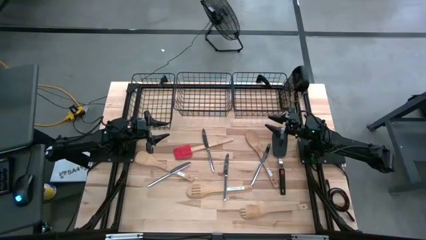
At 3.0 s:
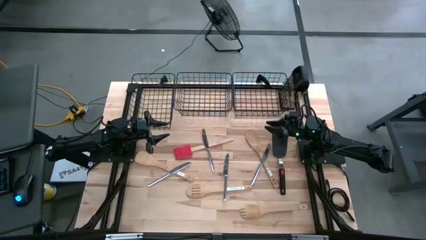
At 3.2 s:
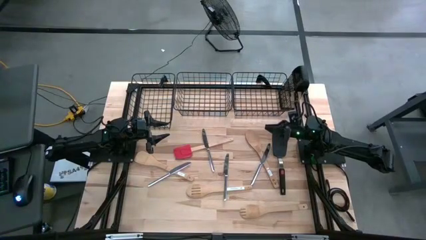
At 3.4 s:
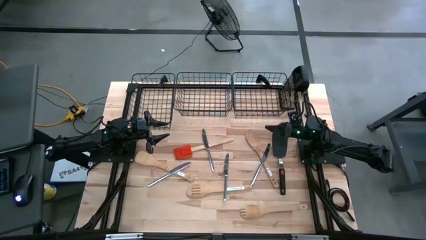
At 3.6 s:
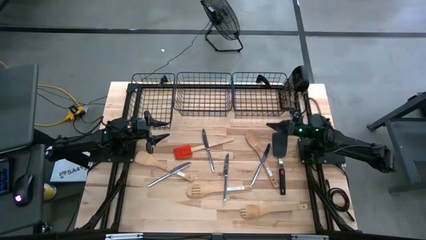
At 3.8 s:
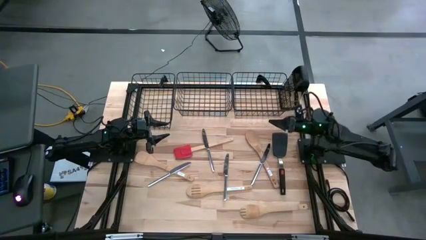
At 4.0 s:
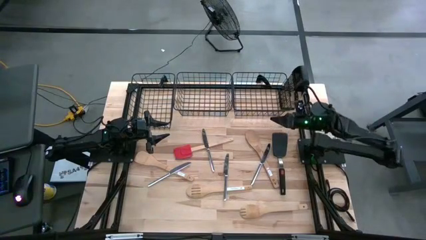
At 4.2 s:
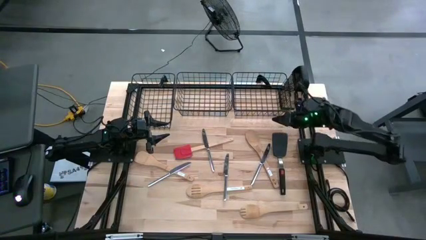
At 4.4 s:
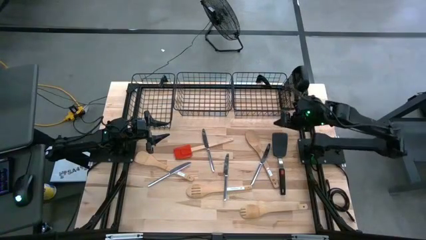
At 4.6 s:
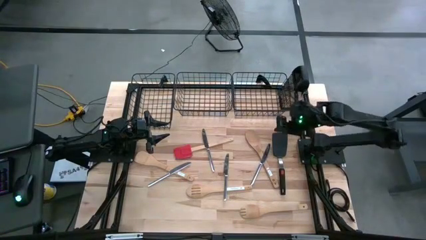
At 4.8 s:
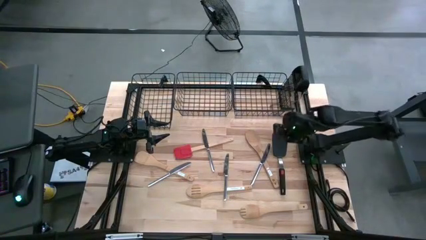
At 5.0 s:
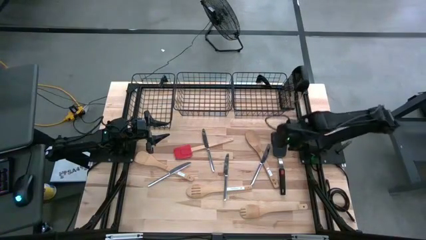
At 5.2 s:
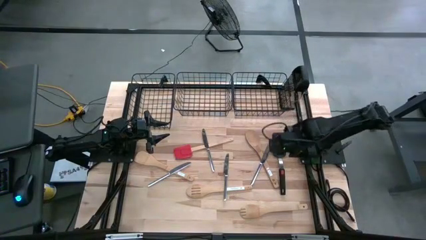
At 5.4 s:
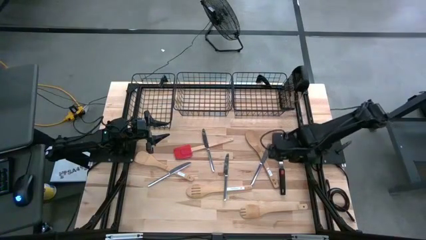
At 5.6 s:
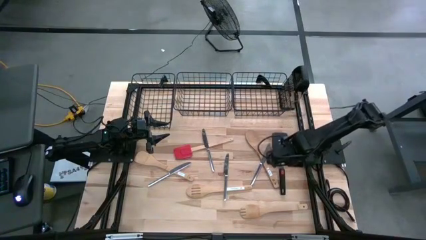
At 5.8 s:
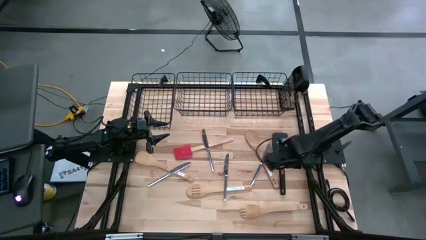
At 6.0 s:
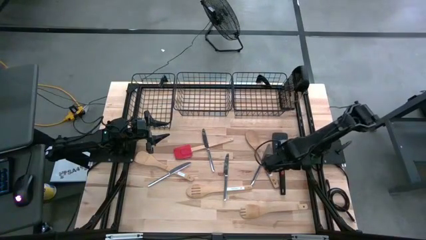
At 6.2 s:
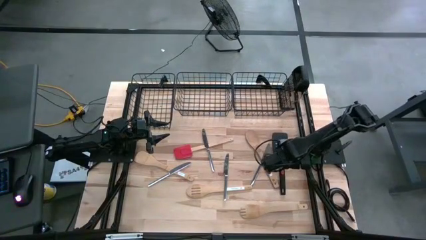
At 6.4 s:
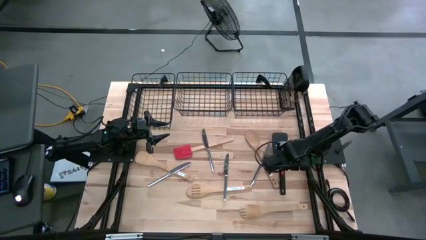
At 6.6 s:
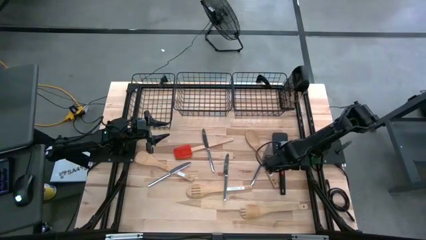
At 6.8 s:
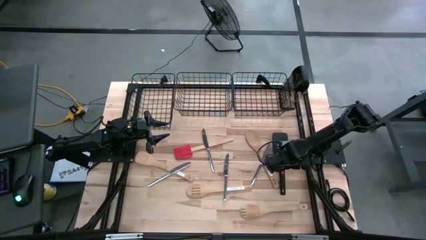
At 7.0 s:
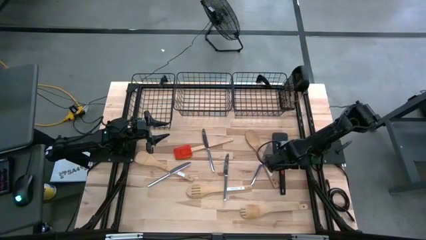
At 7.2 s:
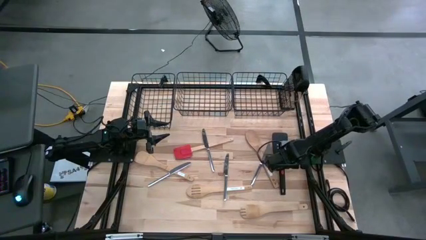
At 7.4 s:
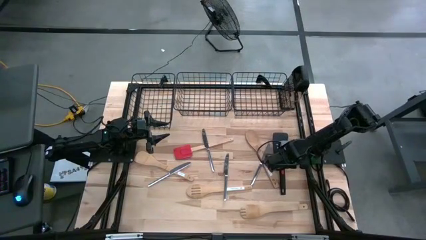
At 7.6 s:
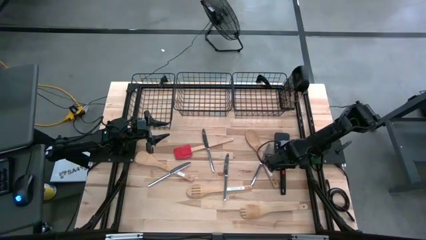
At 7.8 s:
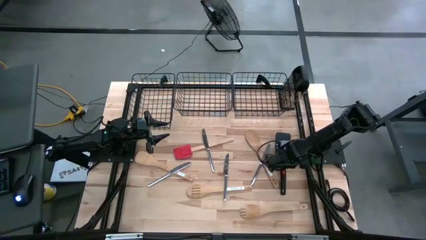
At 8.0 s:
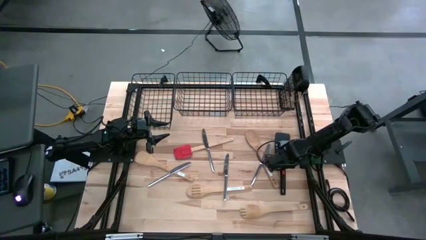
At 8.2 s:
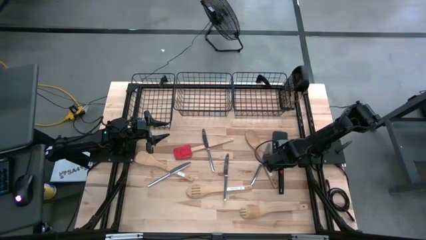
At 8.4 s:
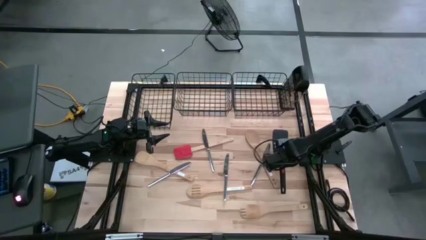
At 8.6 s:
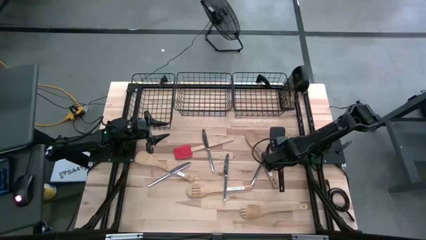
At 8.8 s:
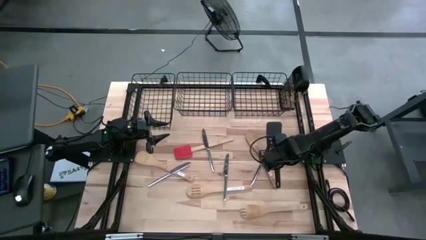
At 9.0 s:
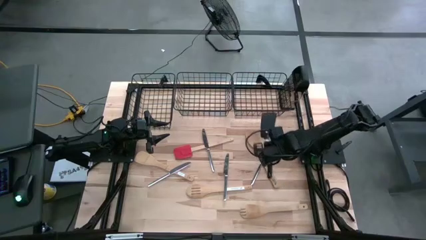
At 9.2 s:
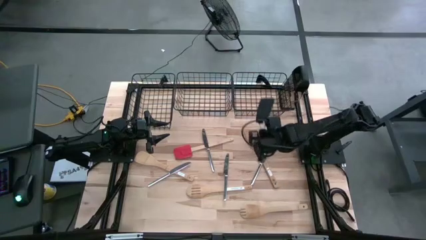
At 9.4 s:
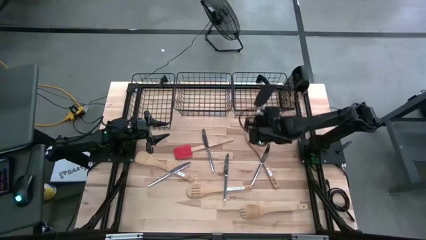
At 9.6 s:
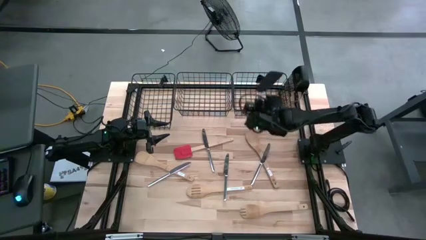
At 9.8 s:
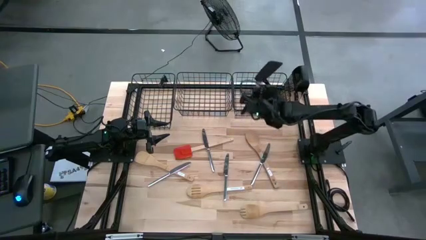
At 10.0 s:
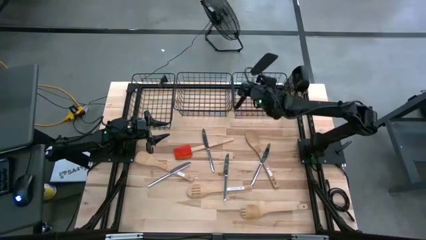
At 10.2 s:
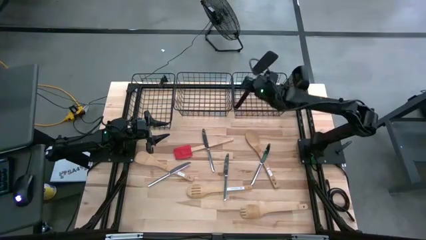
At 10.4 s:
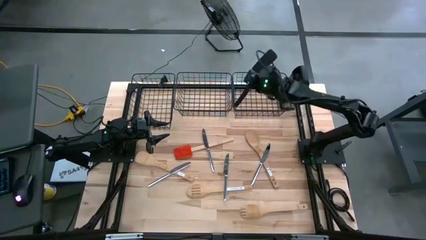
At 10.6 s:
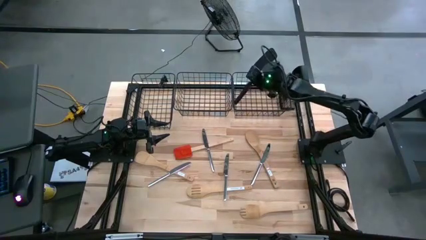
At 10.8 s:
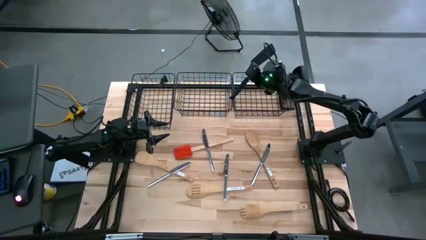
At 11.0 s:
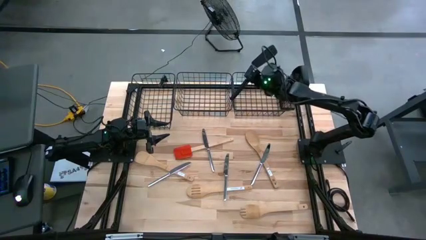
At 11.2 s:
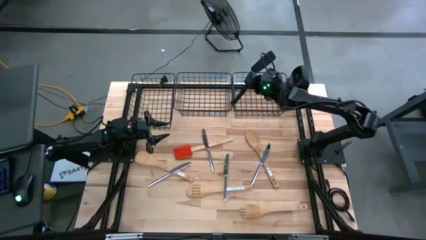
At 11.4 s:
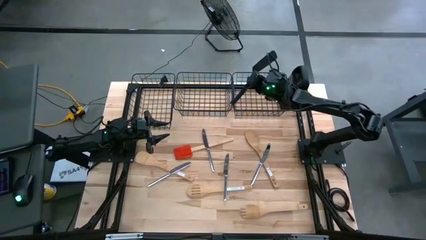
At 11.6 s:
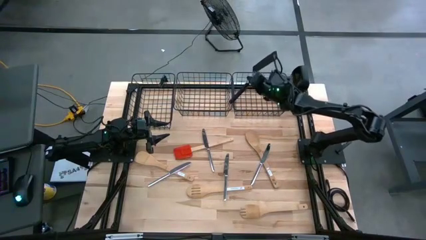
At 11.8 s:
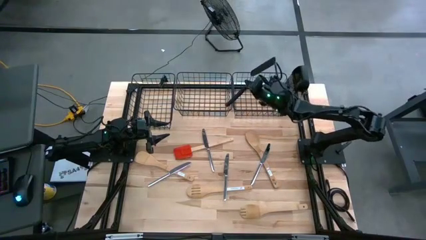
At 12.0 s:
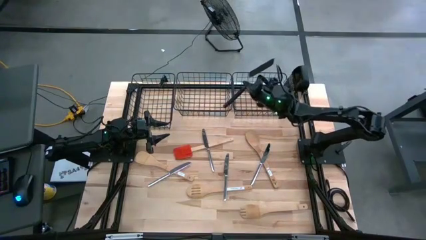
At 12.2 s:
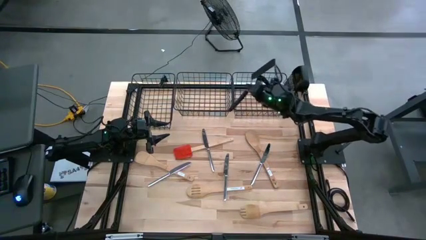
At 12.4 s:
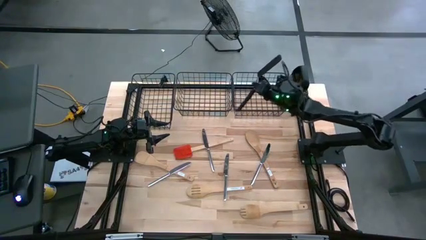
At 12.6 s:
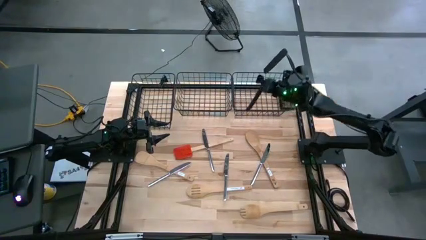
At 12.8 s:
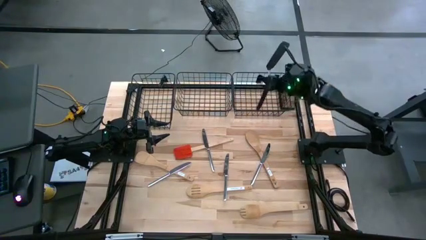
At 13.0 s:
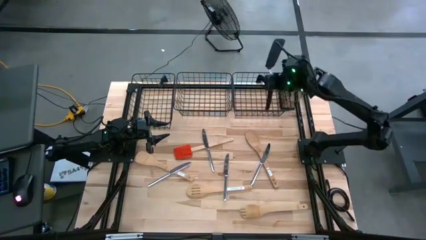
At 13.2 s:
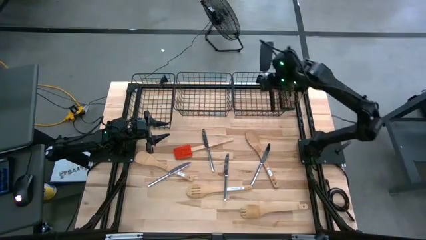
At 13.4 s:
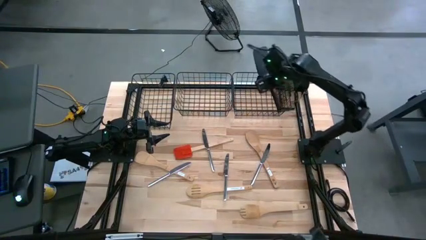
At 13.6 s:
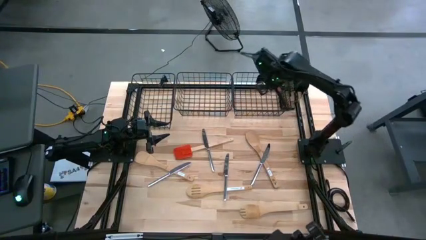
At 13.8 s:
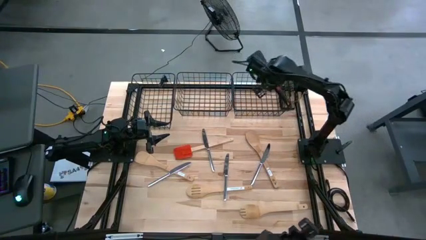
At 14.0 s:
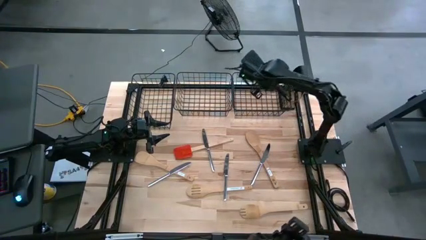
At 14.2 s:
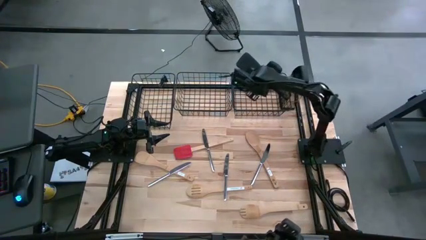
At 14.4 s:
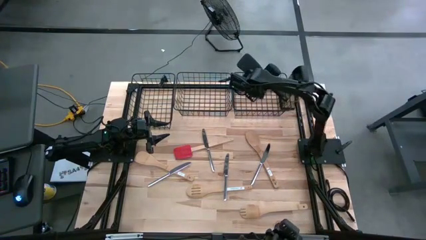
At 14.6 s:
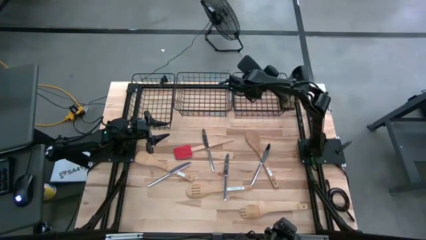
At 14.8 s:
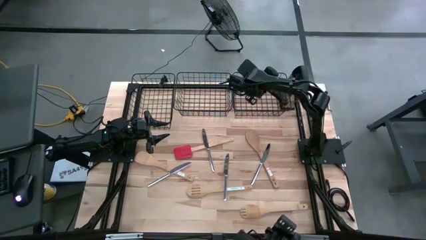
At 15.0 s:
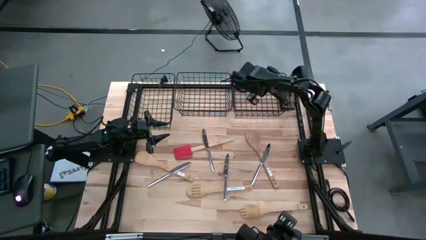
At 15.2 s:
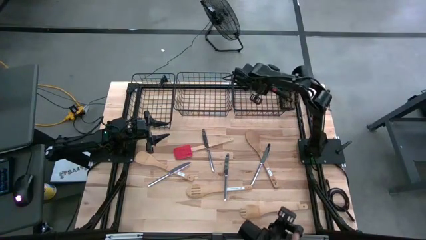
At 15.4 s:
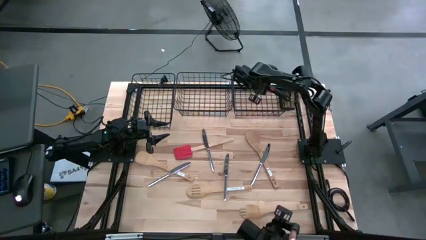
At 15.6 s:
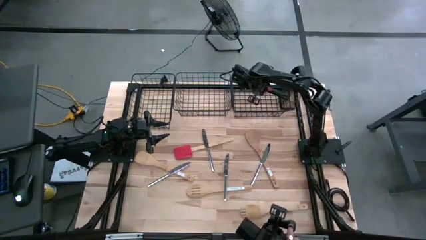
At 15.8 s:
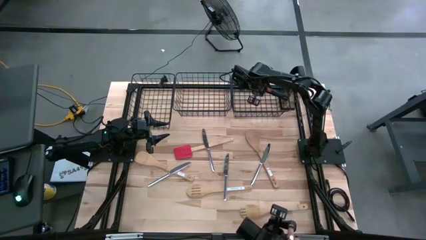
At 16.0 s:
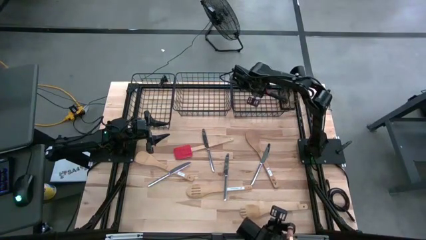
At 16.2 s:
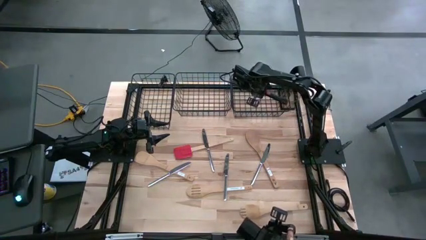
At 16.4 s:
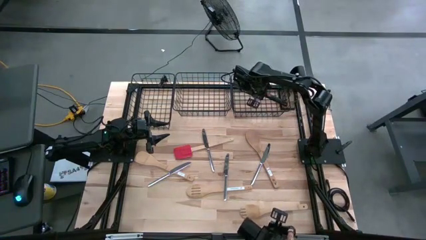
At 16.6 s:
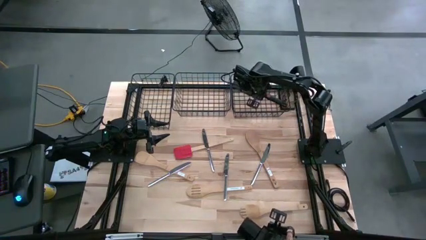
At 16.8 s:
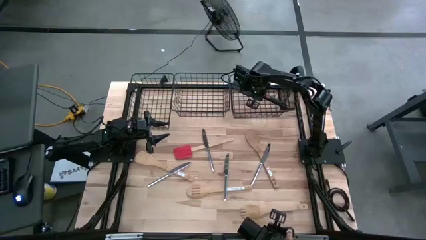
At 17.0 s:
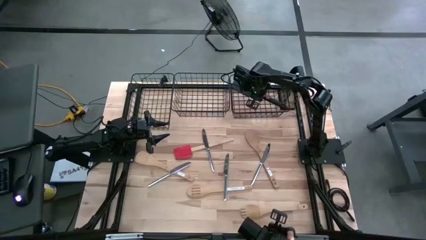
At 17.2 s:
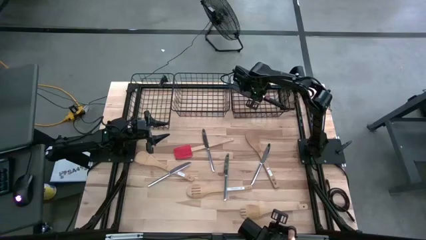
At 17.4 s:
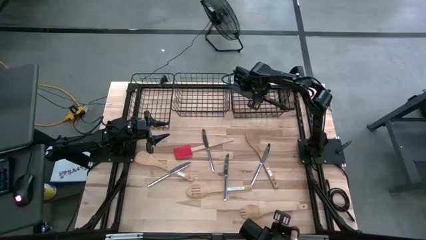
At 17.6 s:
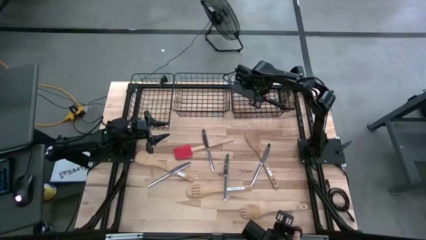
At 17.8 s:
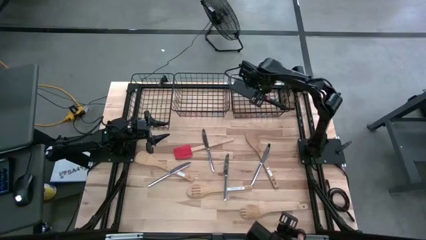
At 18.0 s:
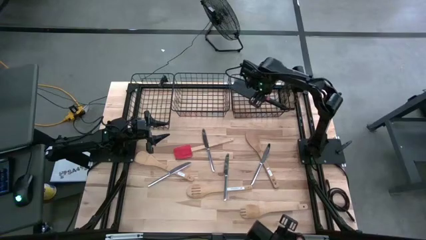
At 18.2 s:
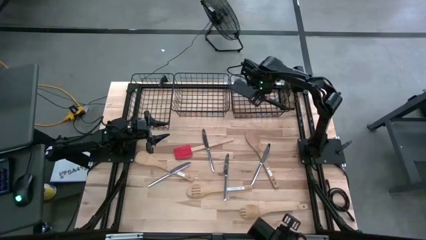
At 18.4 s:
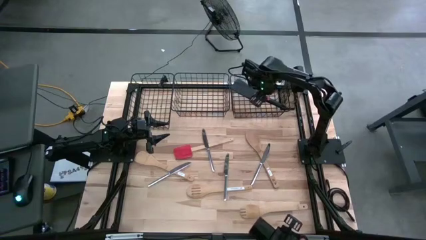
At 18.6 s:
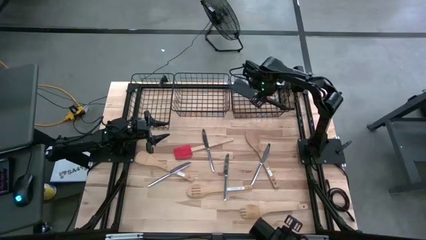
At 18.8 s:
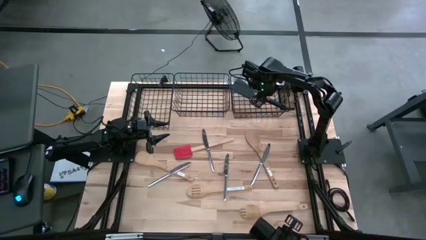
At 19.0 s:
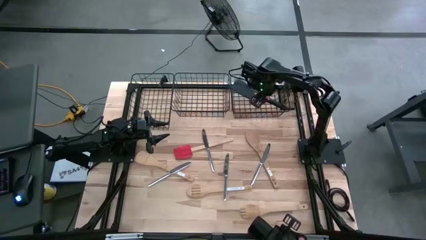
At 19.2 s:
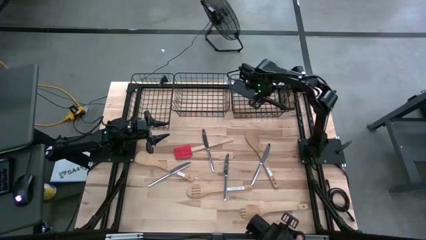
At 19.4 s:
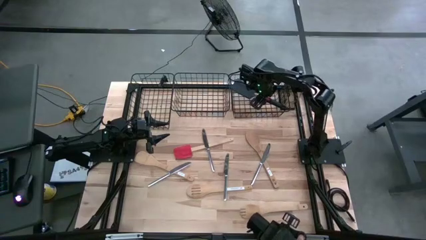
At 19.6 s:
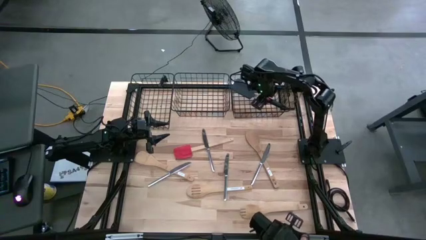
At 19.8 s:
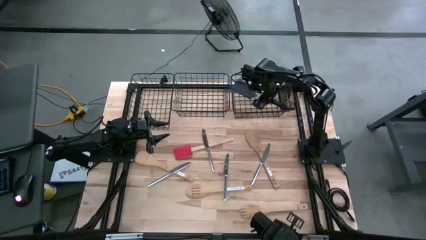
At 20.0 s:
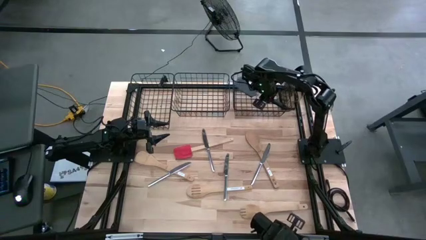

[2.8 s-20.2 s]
Task: Pick & Place Kitchen Items
Put the black silicone spatula into the right wire basket
